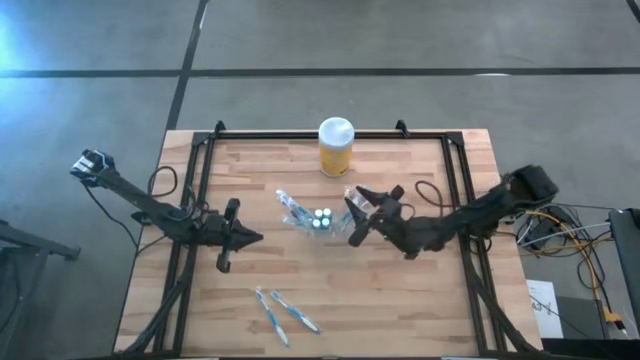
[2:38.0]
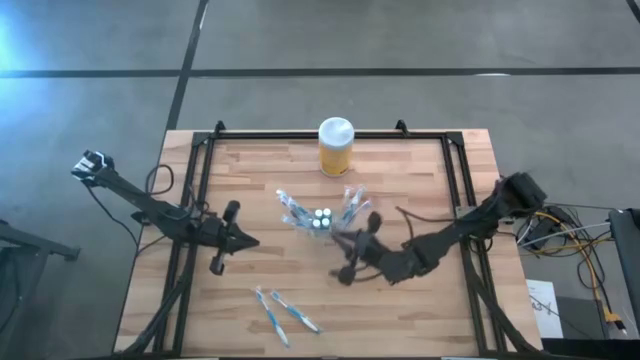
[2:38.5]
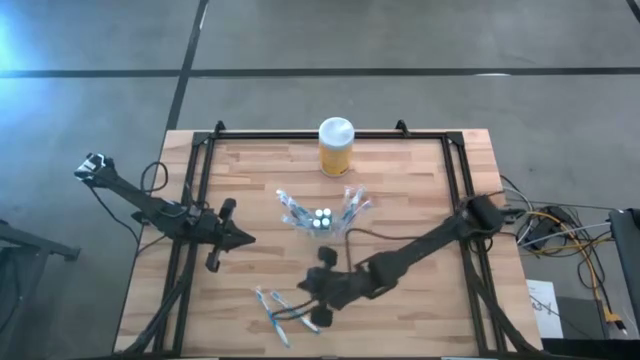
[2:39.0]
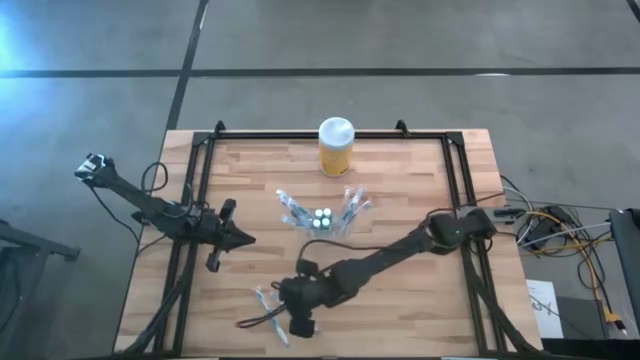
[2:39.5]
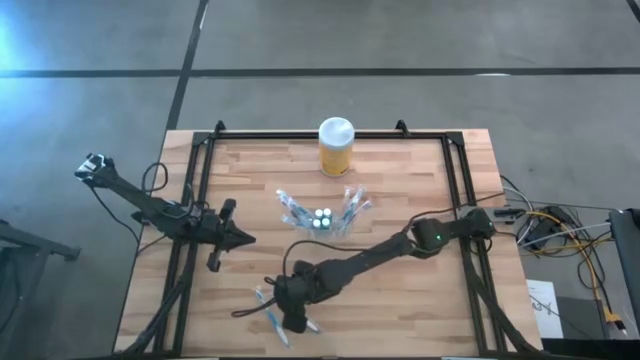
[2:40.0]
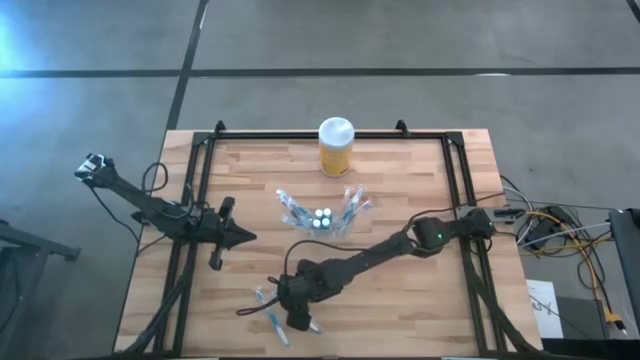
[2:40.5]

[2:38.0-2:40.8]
Task: Pick & Place toothbrushing station
Put the blue toothbrush into the transparent organizer

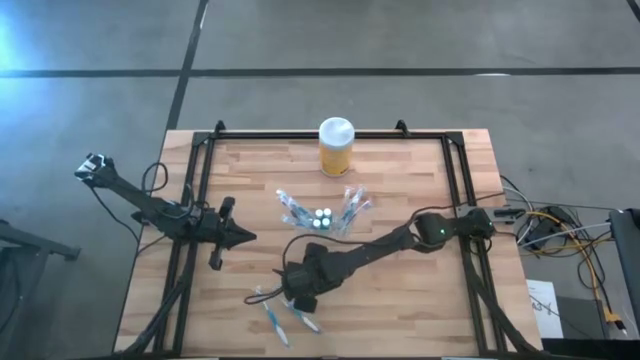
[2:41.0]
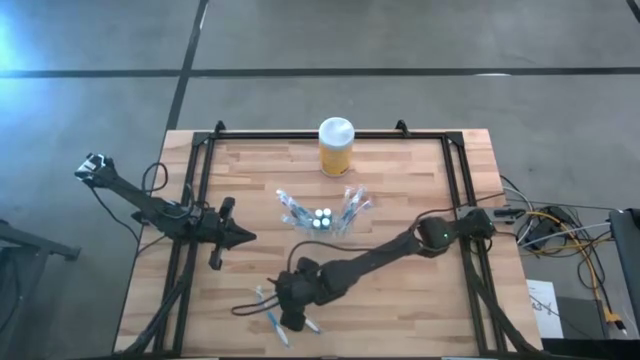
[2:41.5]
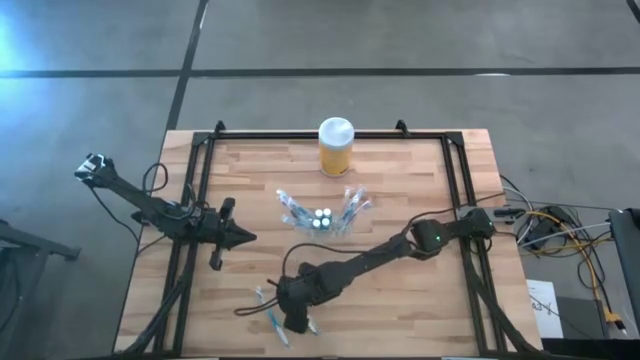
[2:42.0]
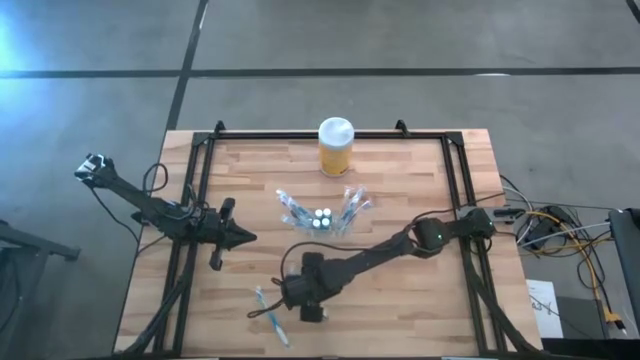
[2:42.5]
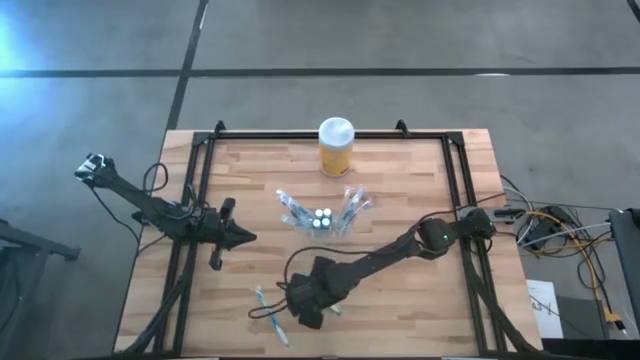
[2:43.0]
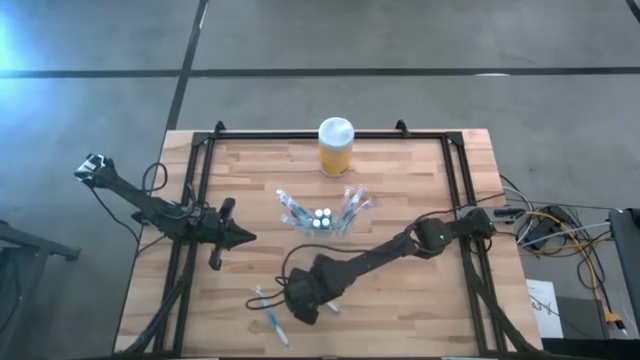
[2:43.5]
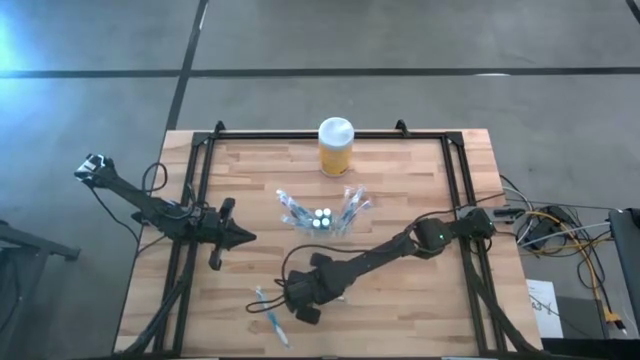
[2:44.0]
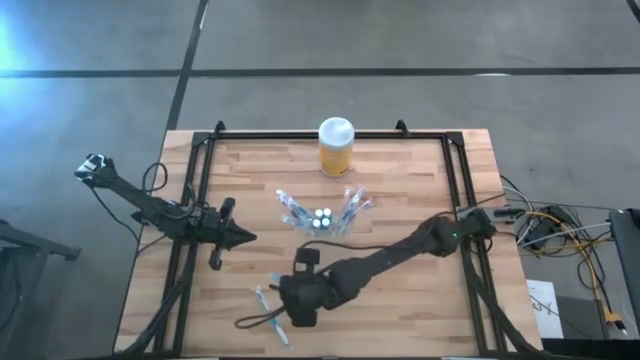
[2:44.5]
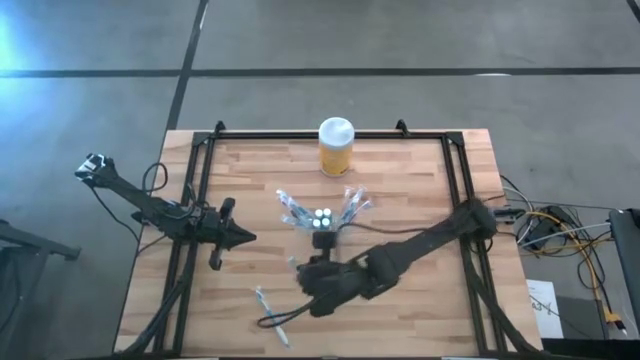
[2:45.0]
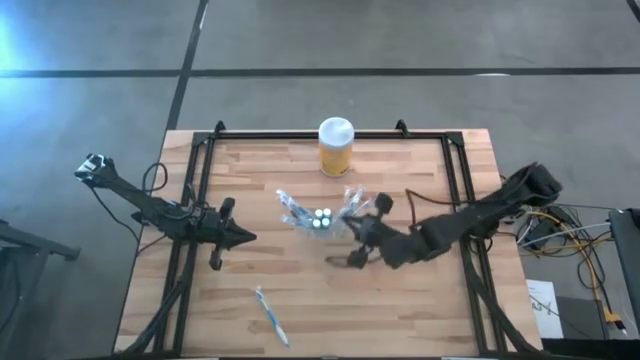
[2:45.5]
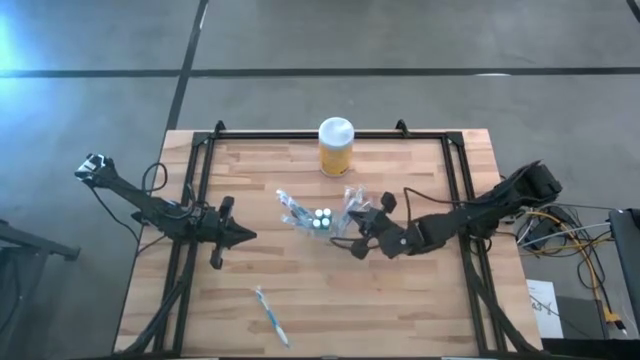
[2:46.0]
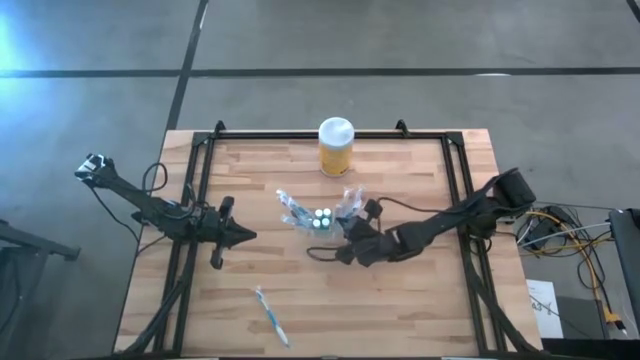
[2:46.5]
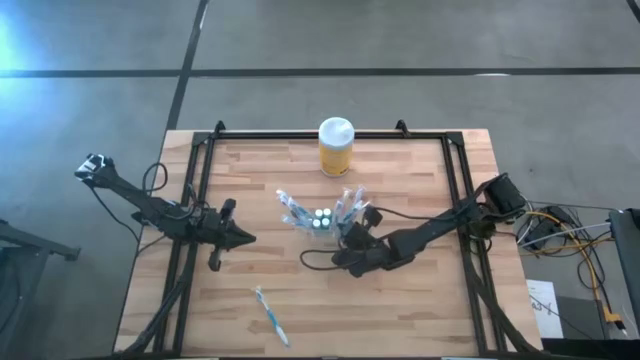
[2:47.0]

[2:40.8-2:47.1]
Put the blue toothbrush into the transparent organizer

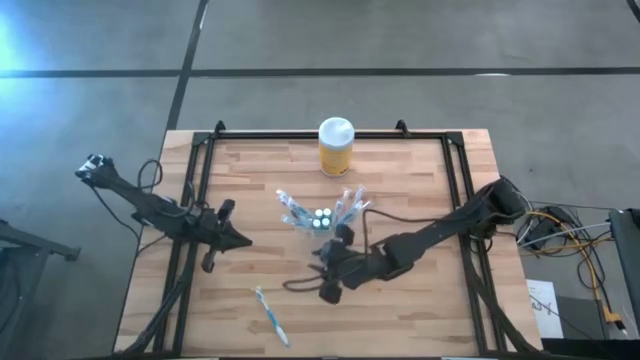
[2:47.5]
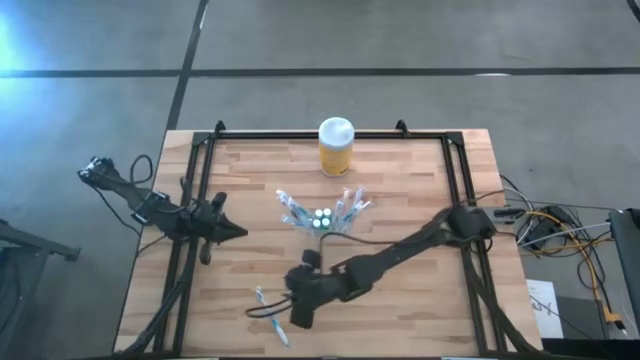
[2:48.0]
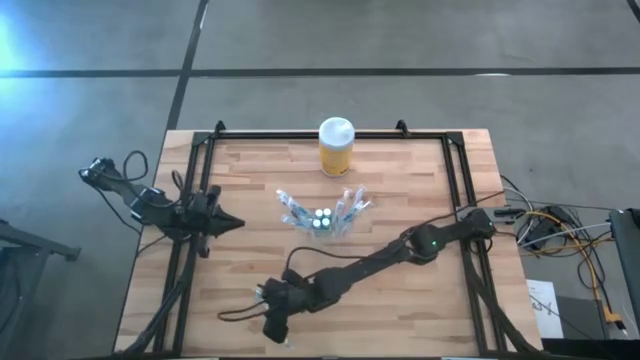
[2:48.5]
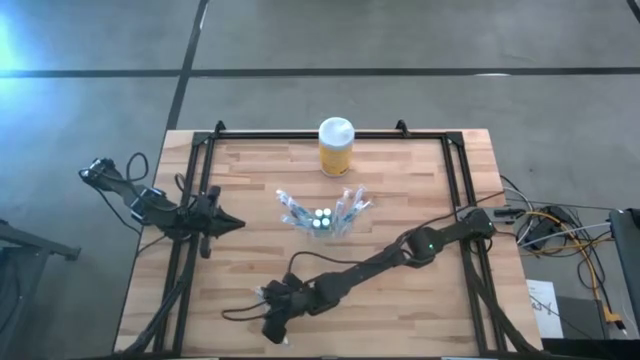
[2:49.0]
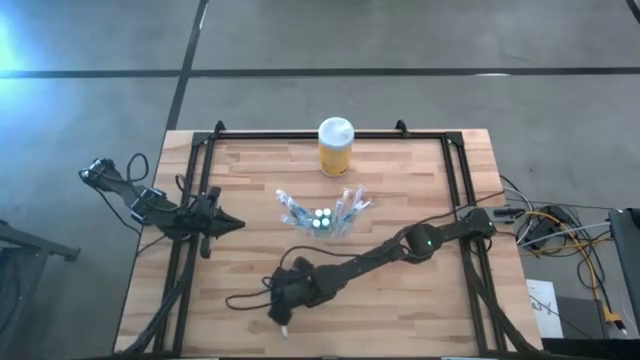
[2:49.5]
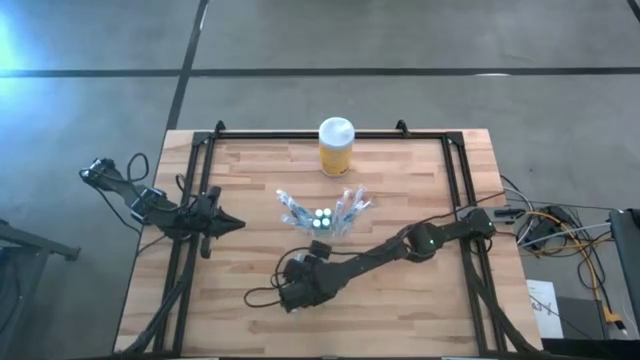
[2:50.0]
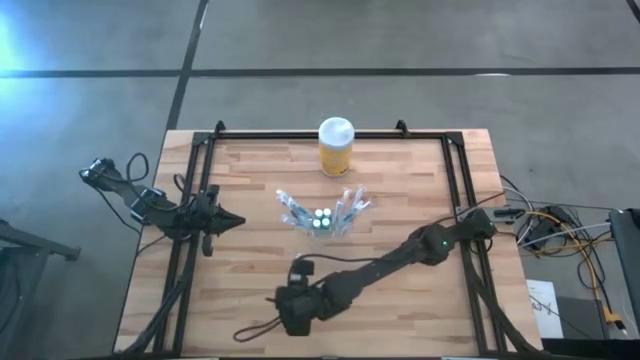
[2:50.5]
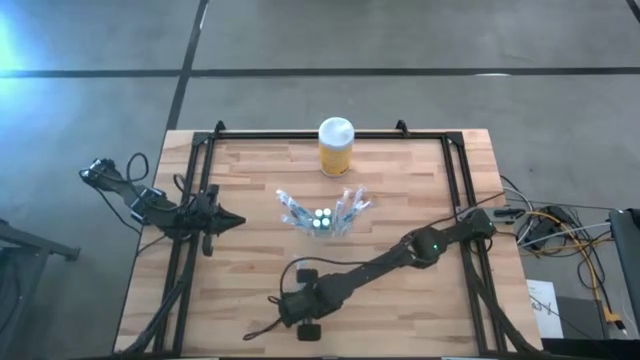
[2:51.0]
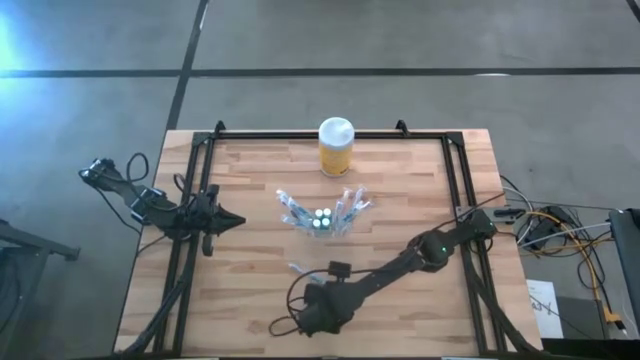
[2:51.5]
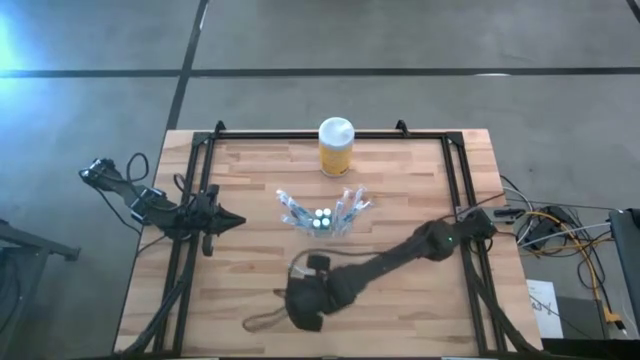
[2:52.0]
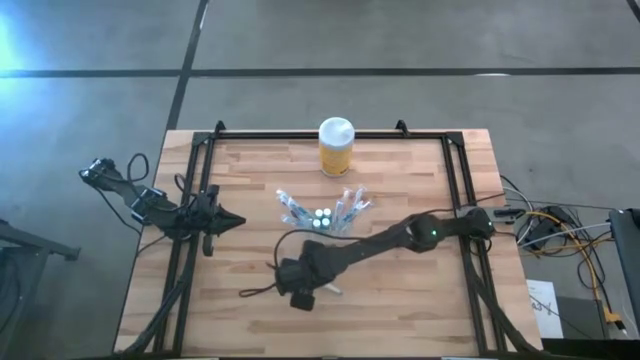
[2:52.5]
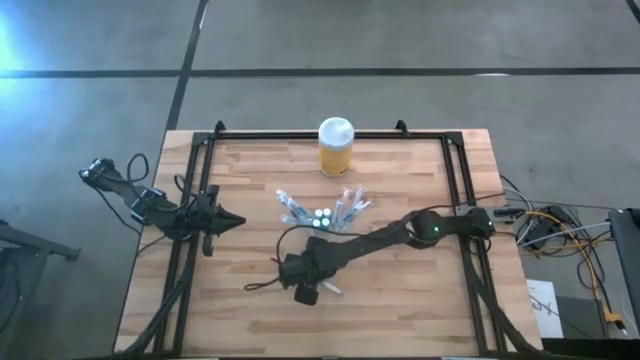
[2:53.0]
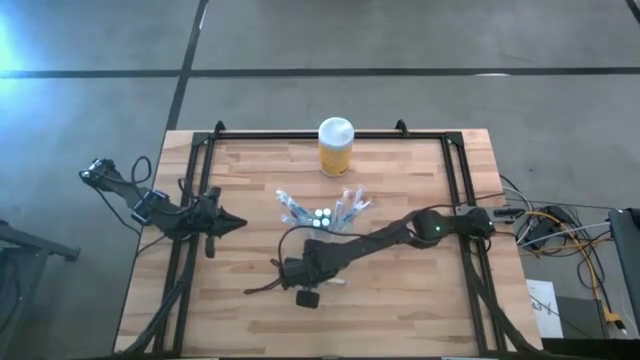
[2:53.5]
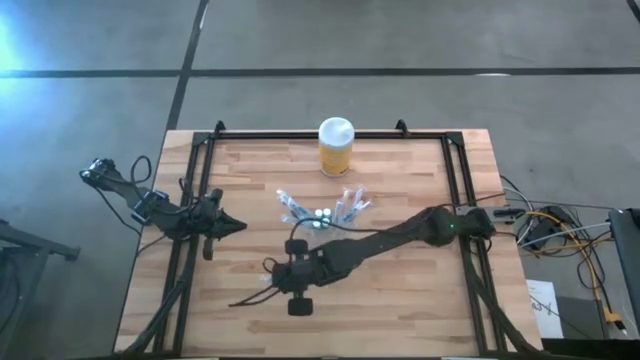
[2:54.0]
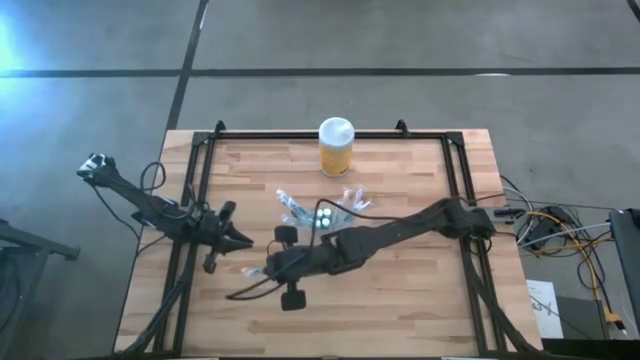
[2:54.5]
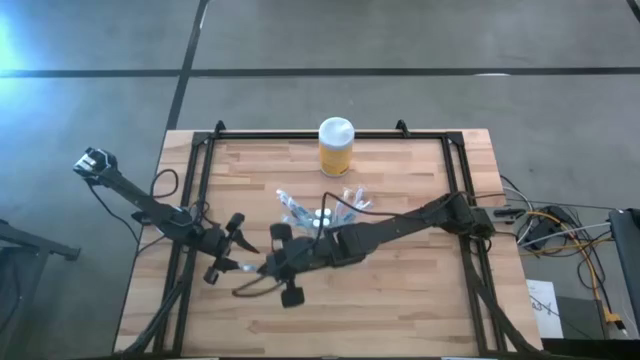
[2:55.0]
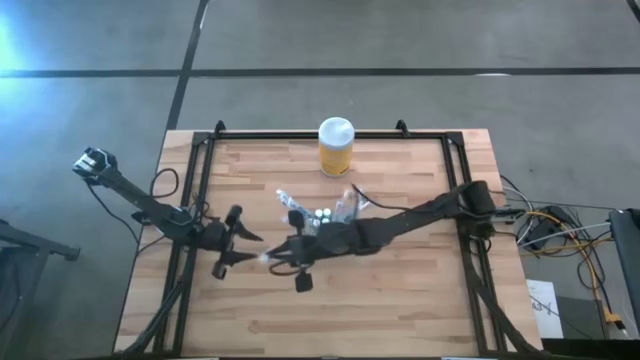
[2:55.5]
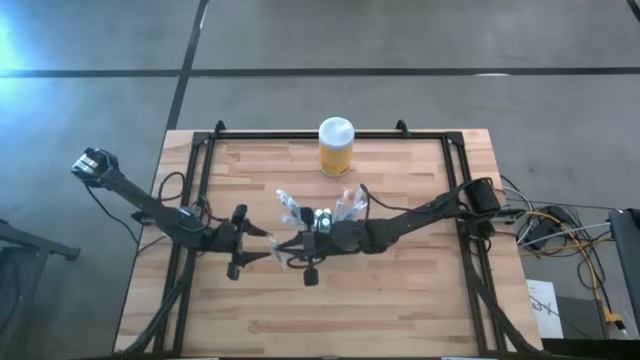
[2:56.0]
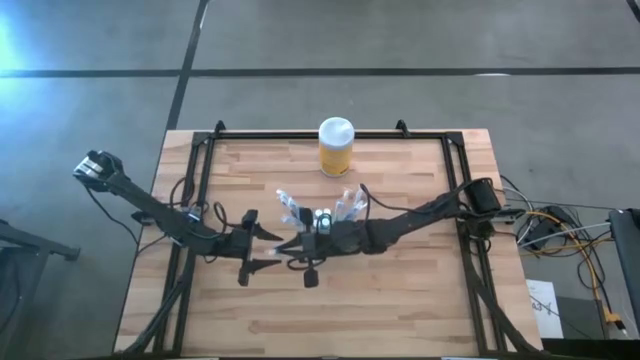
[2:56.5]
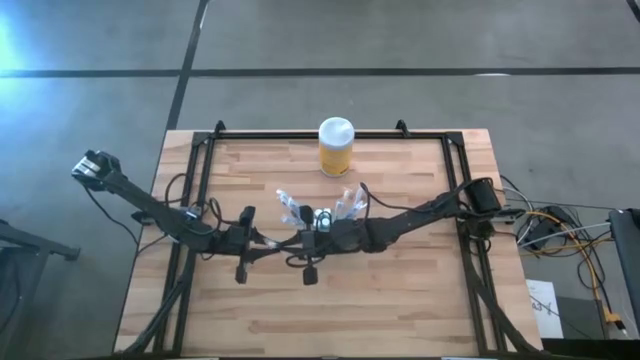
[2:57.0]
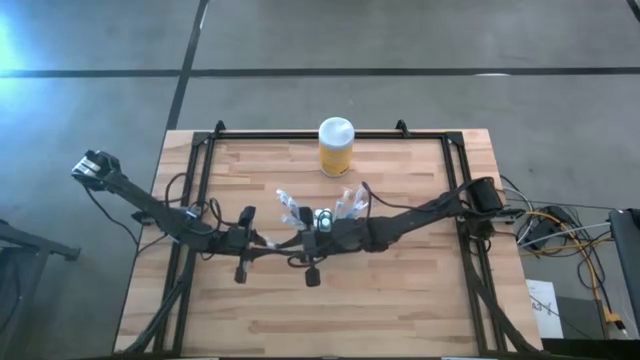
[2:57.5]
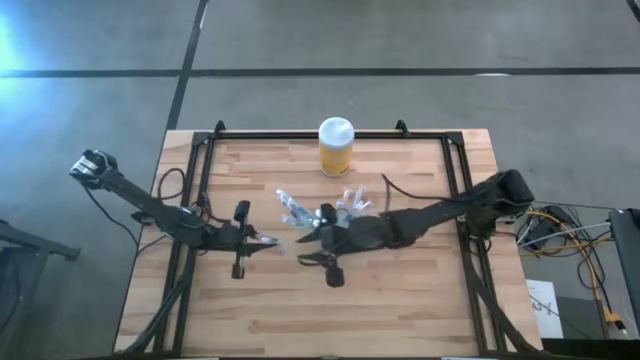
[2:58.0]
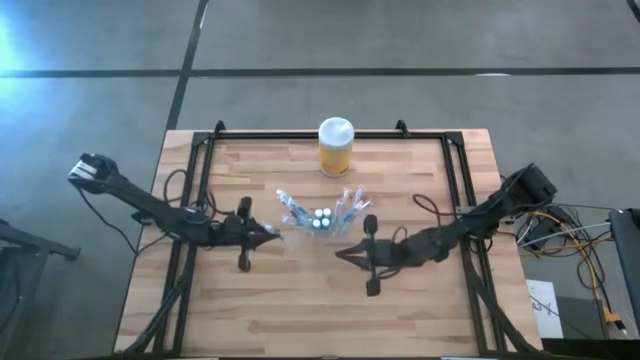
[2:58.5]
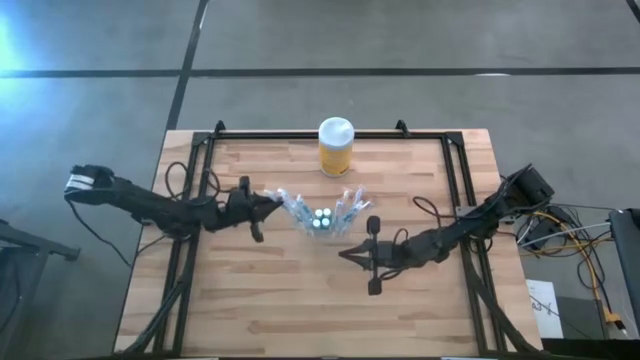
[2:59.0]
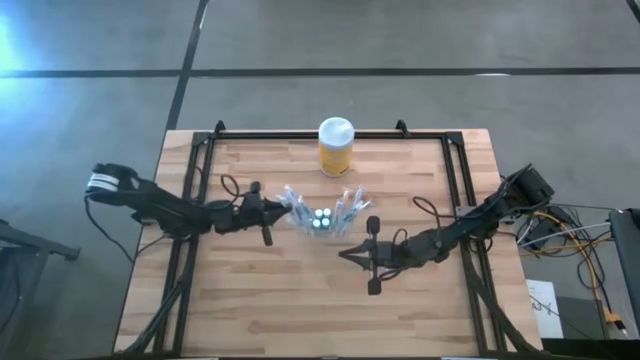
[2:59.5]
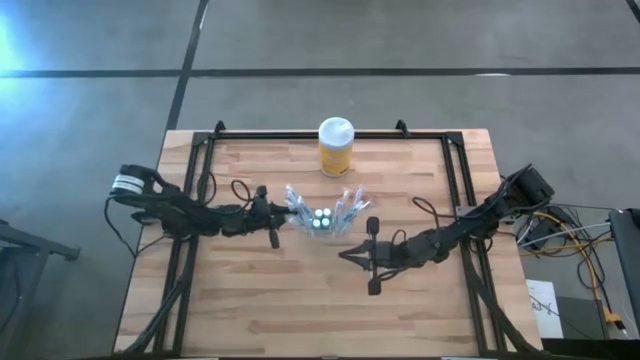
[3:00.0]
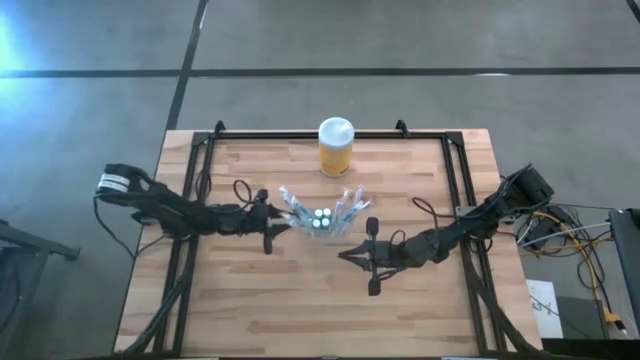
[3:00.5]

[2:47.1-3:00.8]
Put the blue toothbrush into the transparent organizer
